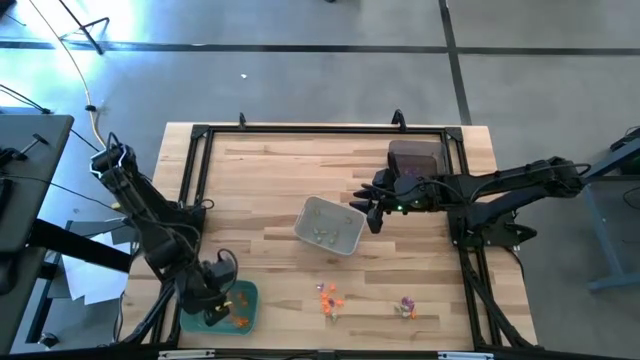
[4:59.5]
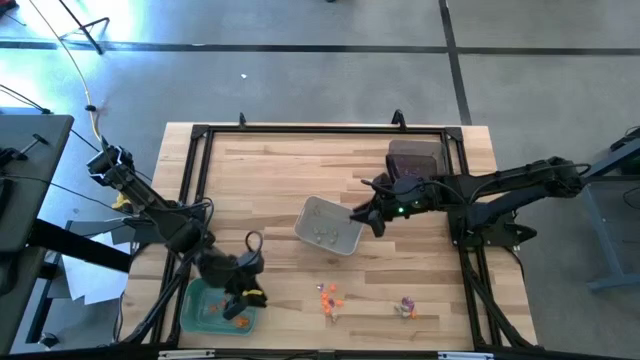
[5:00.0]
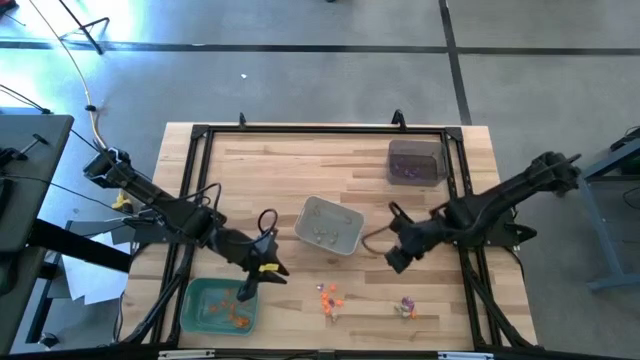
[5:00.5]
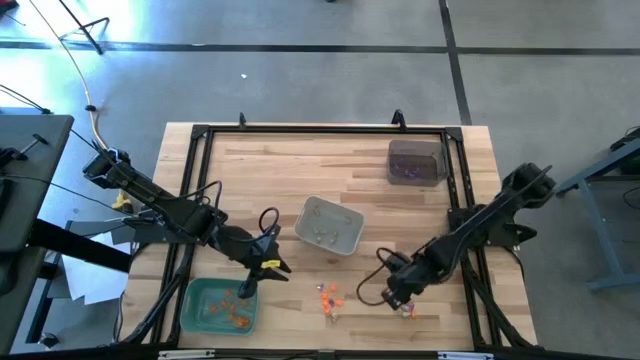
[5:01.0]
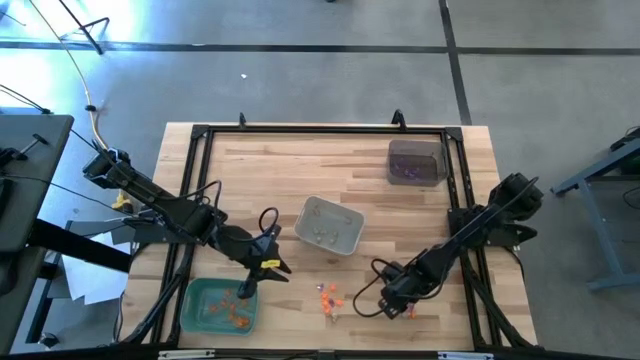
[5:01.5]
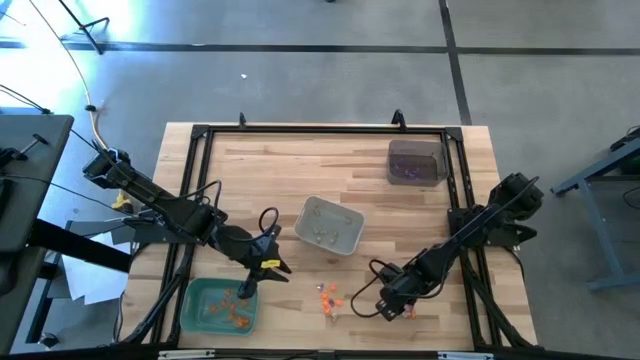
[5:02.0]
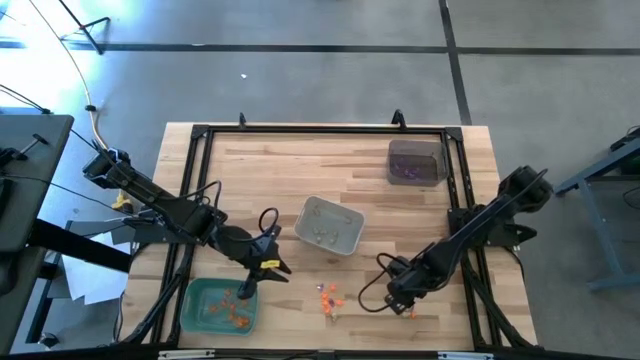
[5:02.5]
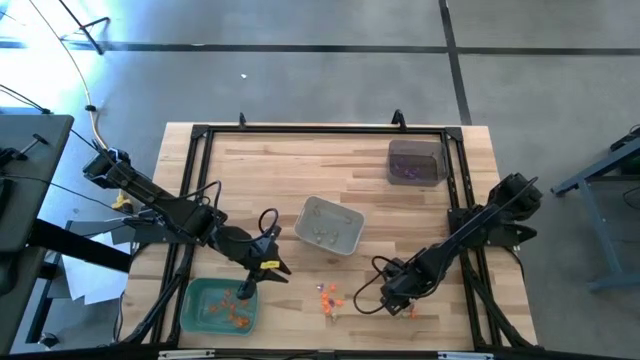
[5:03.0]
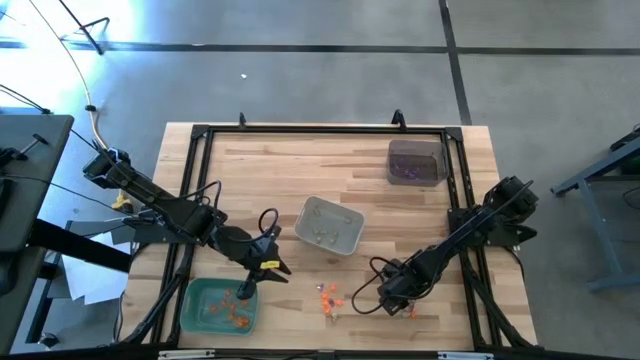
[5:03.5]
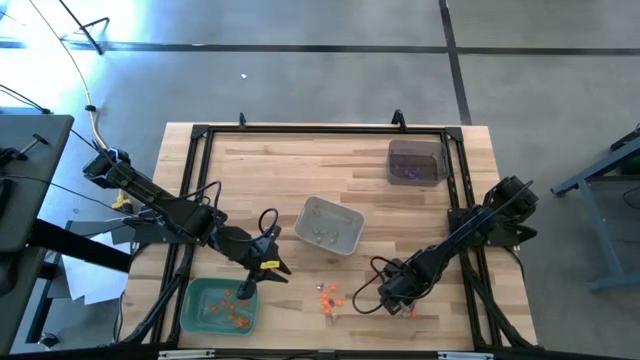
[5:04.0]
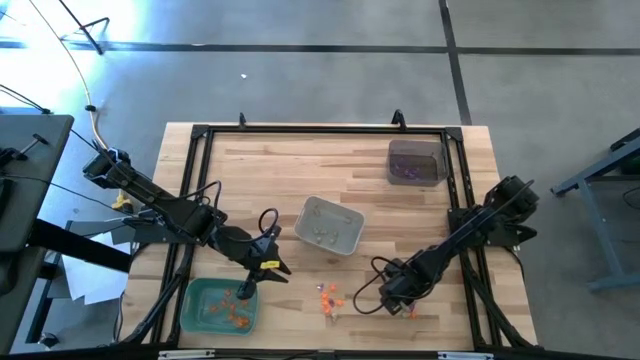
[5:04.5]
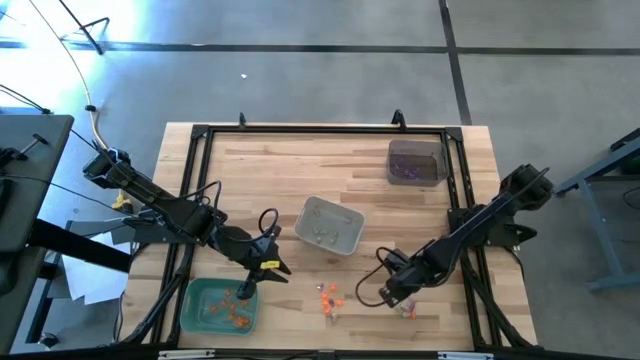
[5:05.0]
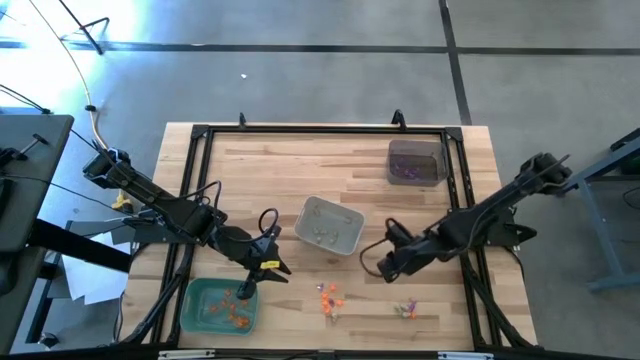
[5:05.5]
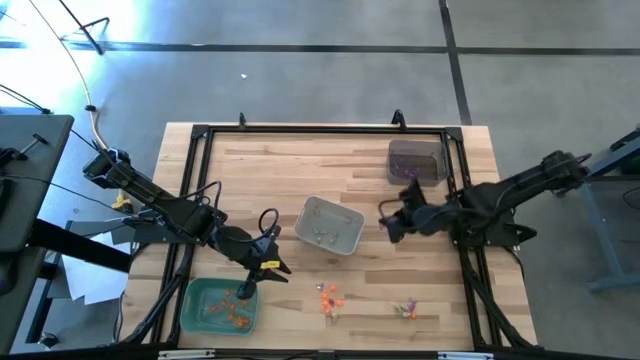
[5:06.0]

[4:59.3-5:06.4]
Task: Sort Halloween decoration
Put the violet witch hat toy into the black bin

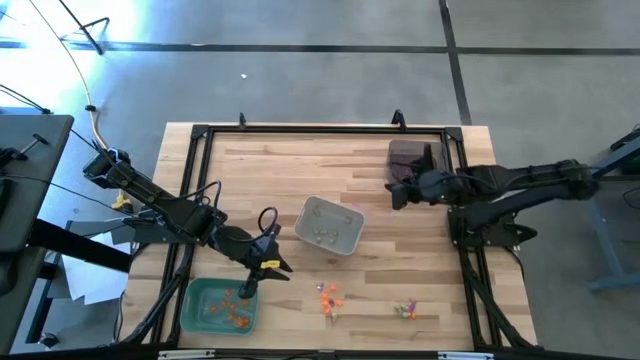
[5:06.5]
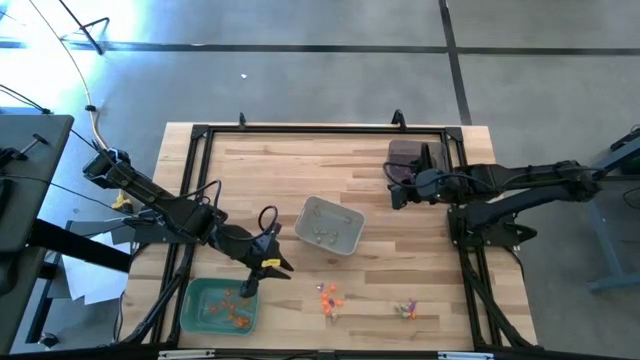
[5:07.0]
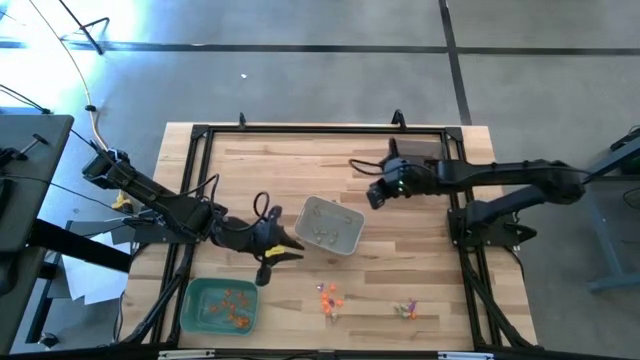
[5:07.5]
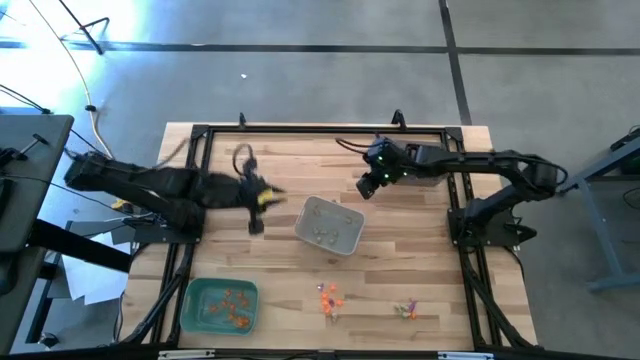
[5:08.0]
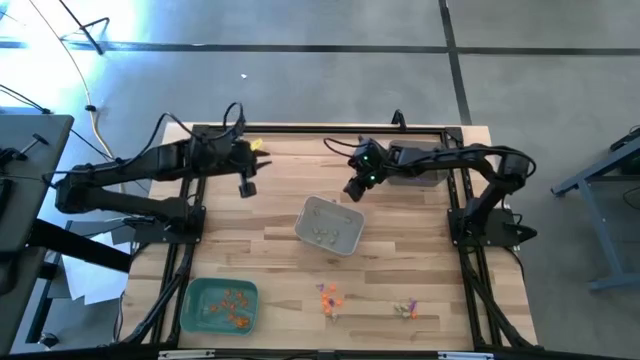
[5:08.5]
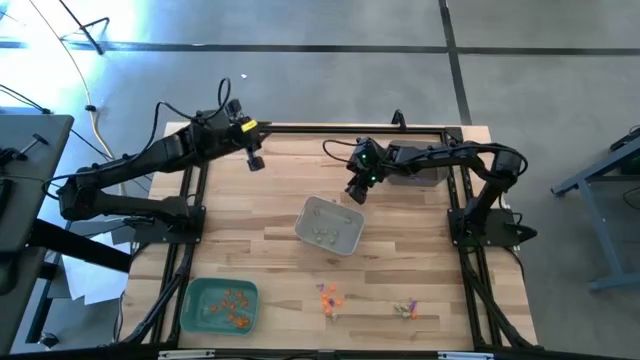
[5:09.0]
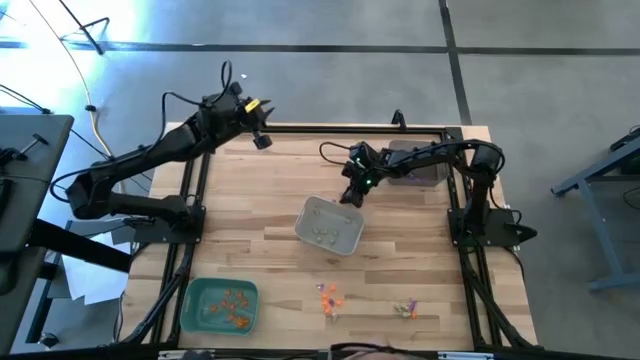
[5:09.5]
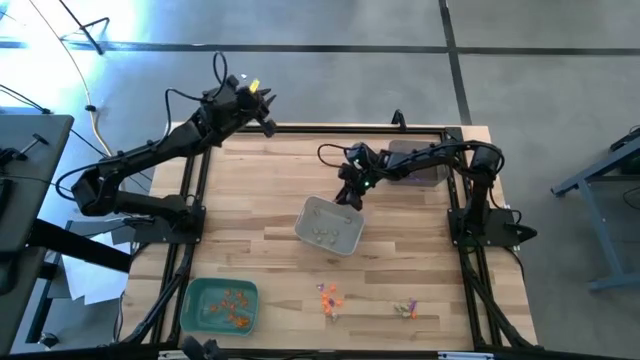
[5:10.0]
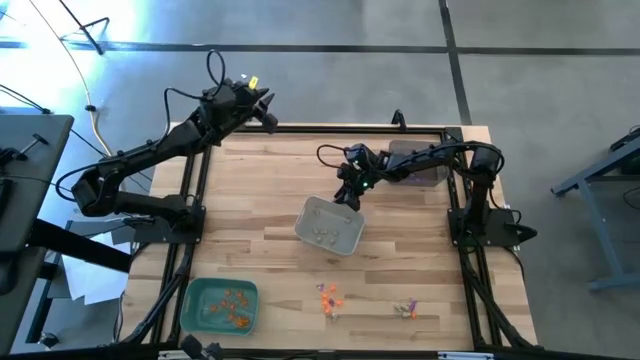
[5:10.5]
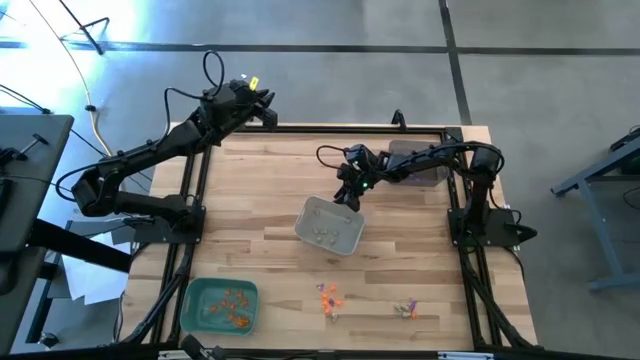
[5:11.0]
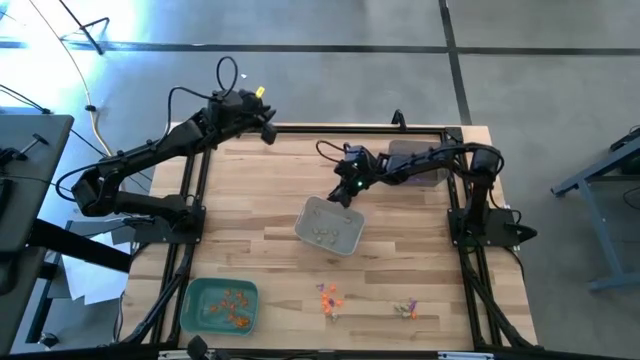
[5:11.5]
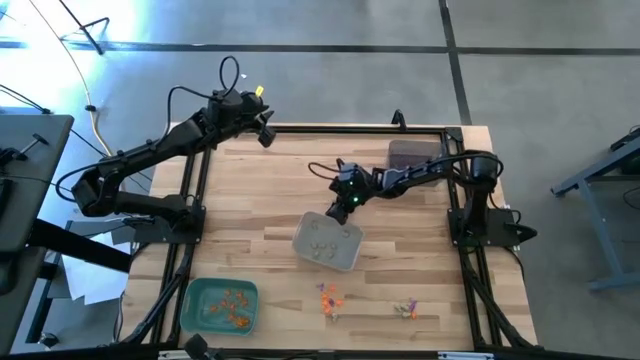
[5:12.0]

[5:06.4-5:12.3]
Adjust the white bin

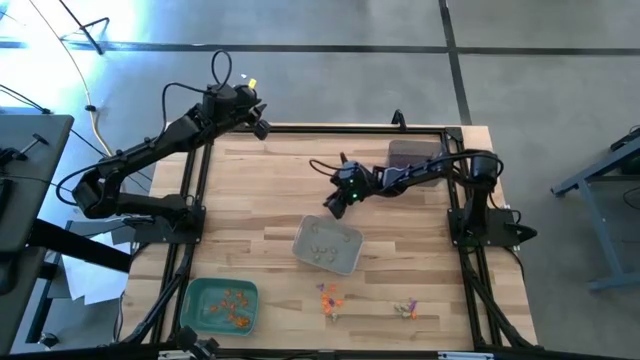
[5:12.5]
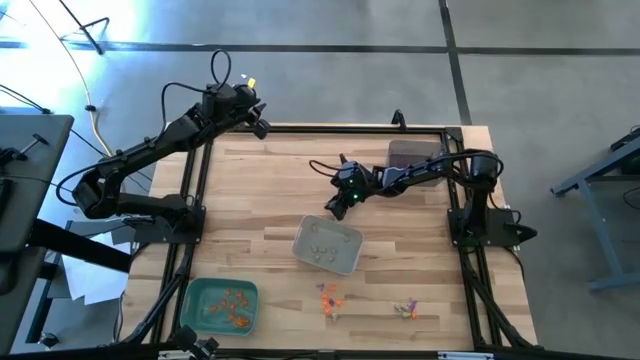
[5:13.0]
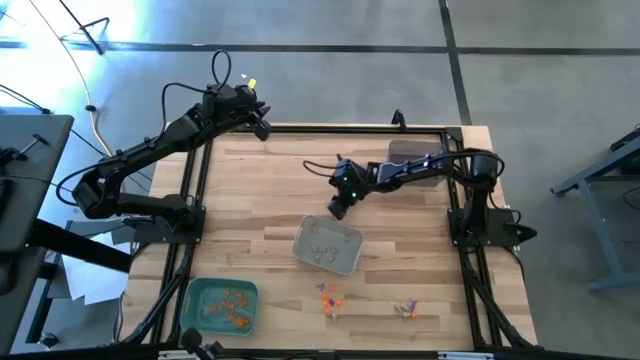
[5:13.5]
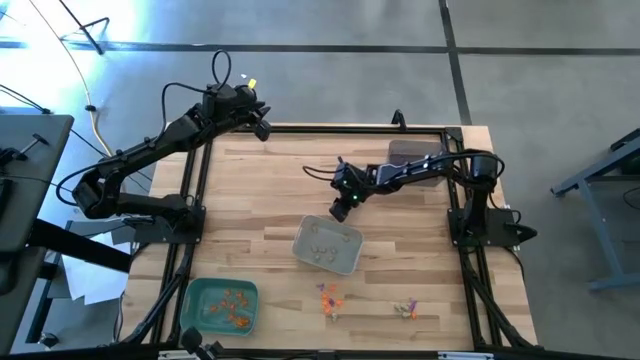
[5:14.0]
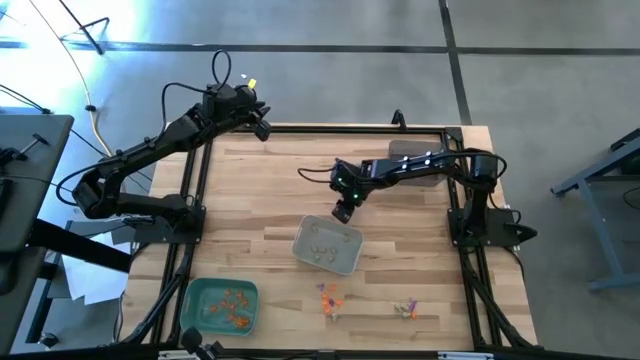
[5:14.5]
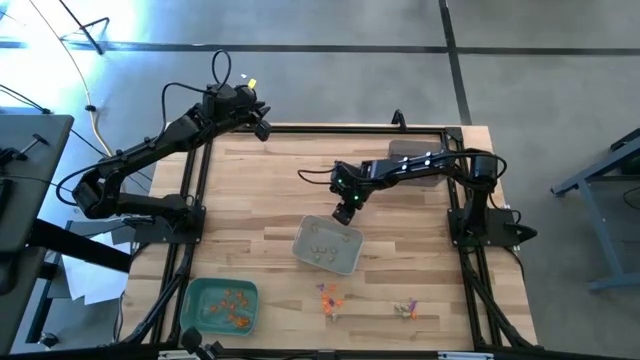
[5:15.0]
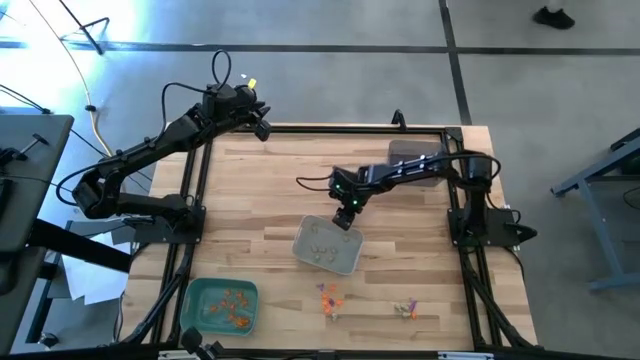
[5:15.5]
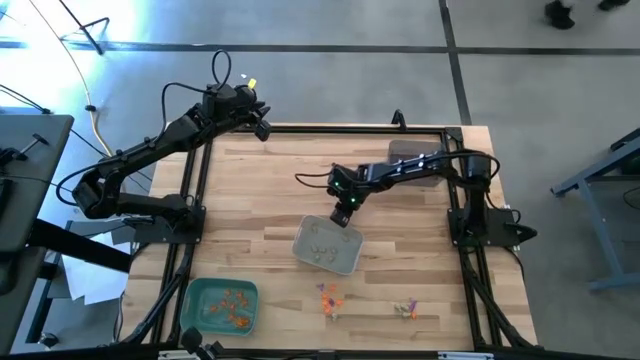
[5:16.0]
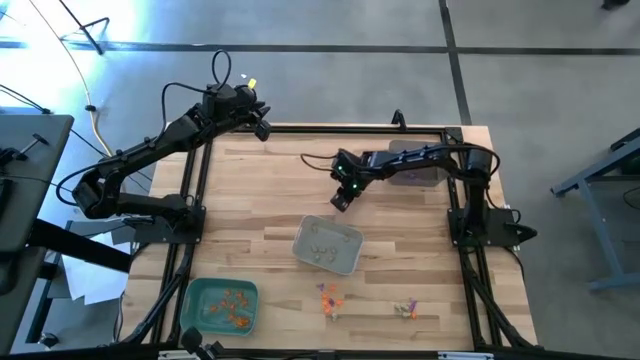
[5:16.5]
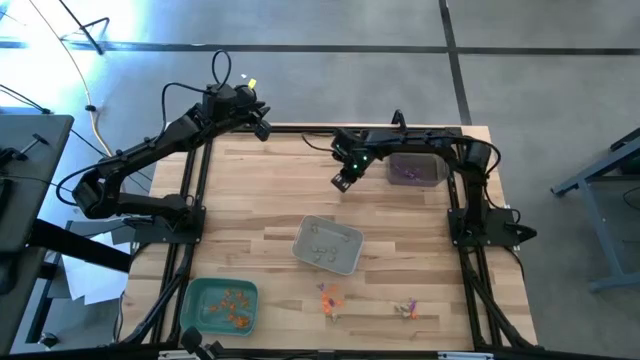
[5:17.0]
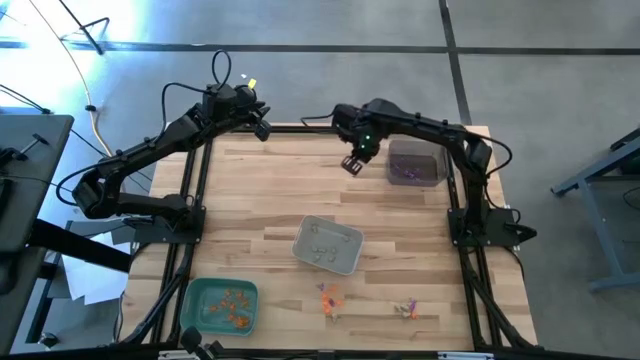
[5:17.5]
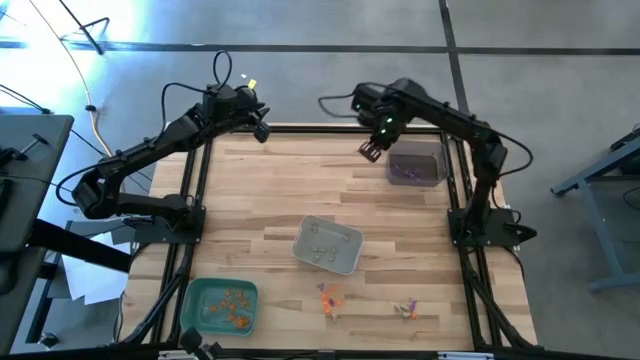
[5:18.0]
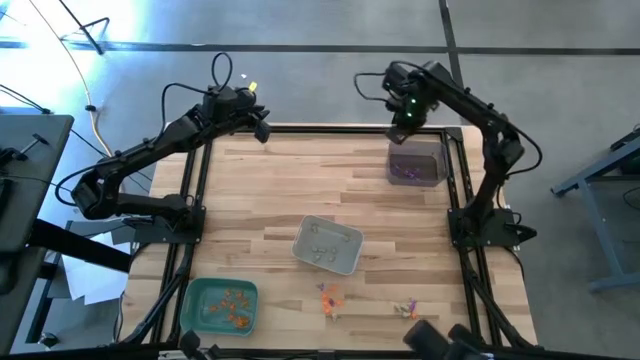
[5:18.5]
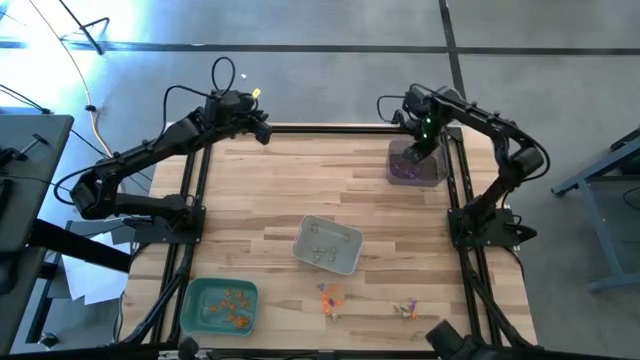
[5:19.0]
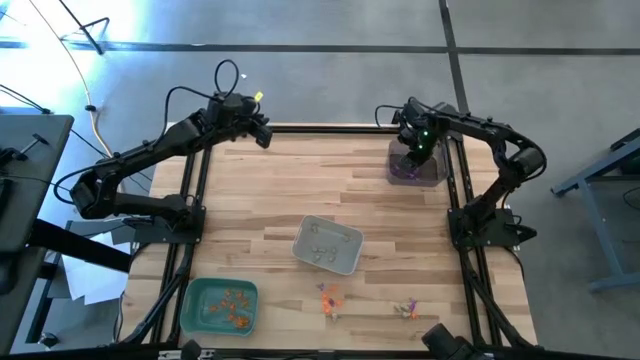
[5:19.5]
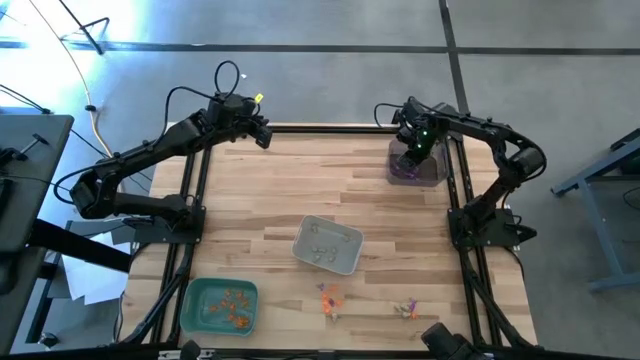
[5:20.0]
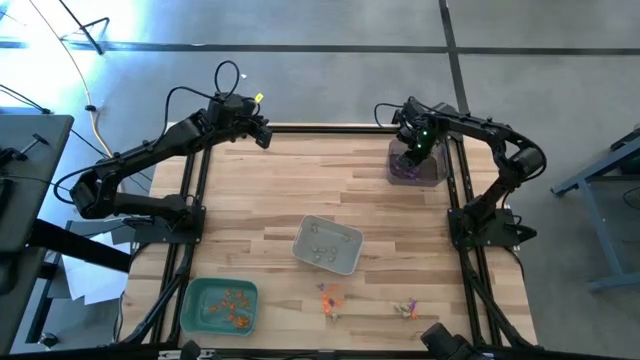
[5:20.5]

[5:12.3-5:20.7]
Put the violet witch hat toy into the black bin
